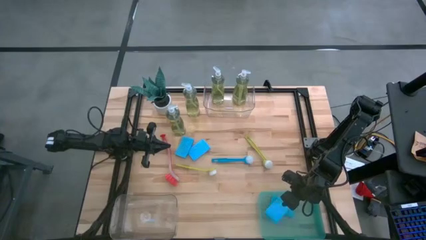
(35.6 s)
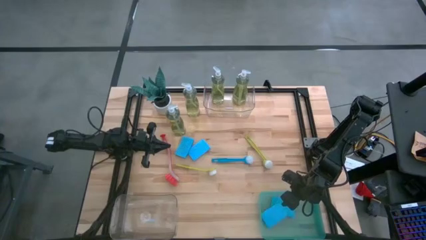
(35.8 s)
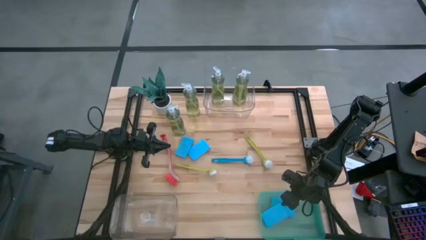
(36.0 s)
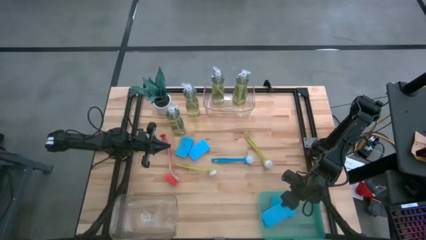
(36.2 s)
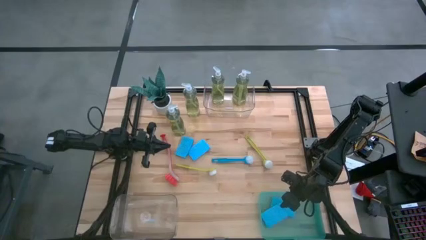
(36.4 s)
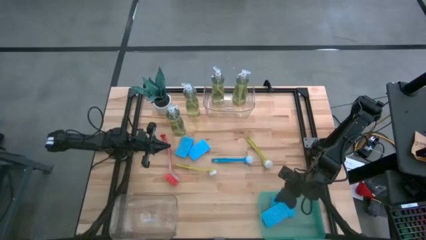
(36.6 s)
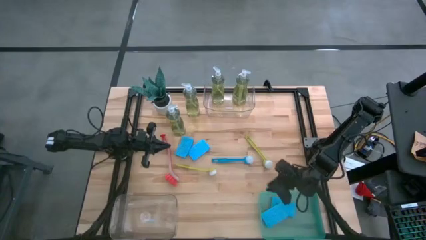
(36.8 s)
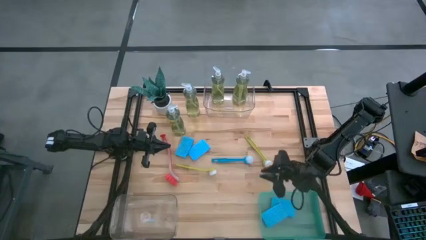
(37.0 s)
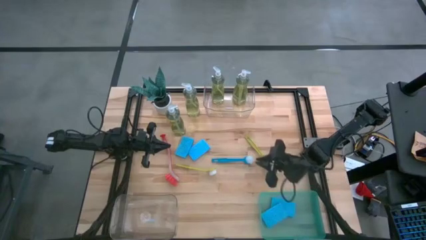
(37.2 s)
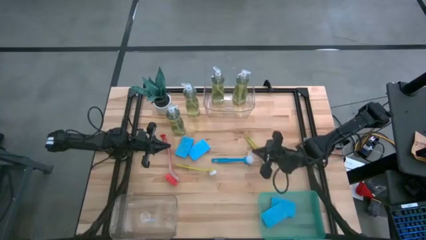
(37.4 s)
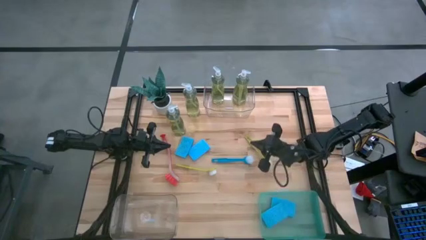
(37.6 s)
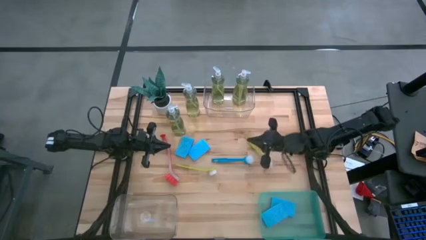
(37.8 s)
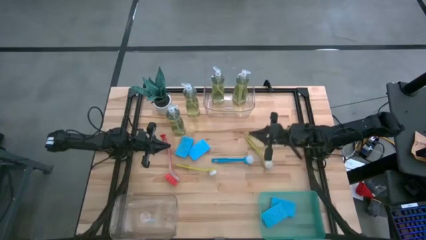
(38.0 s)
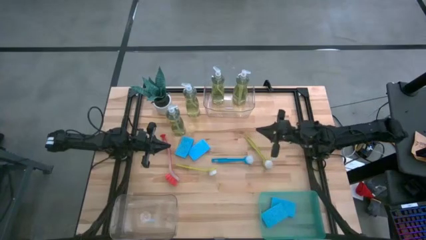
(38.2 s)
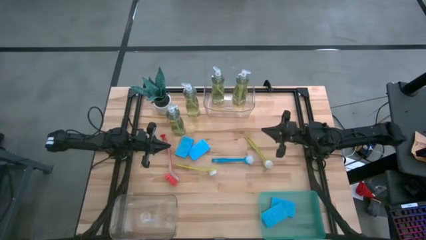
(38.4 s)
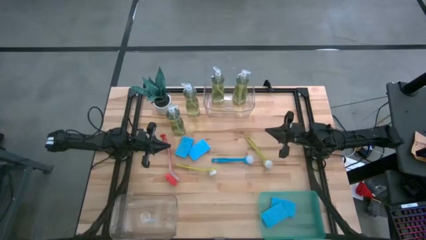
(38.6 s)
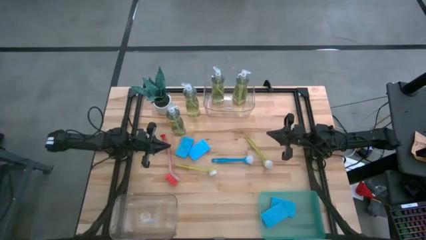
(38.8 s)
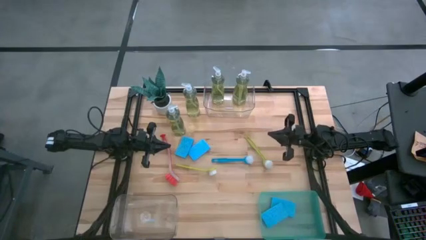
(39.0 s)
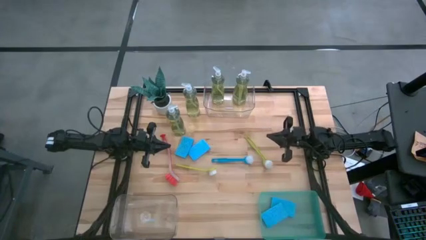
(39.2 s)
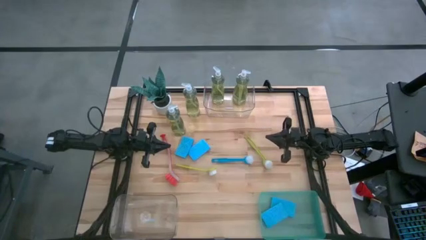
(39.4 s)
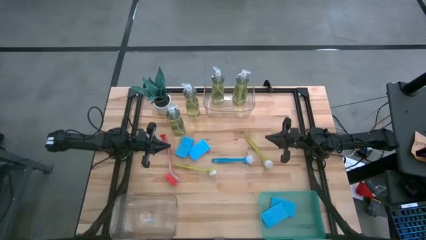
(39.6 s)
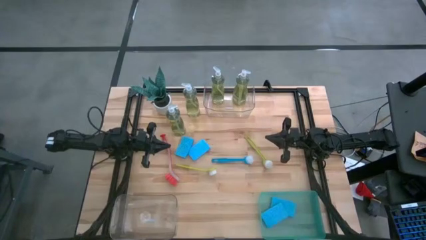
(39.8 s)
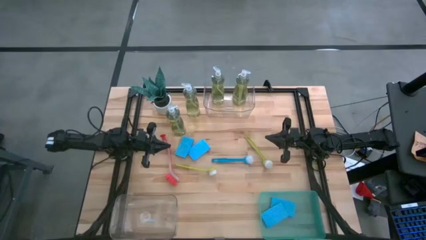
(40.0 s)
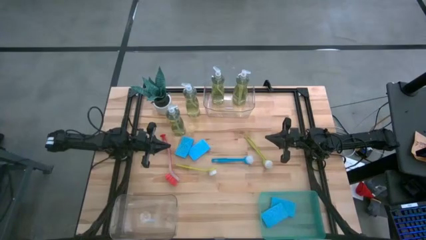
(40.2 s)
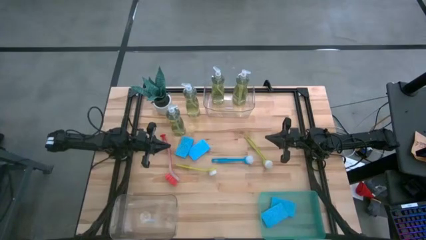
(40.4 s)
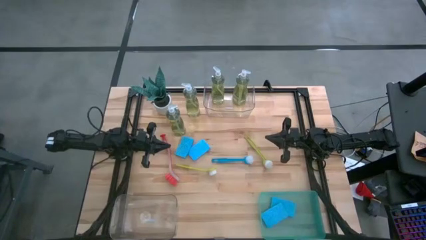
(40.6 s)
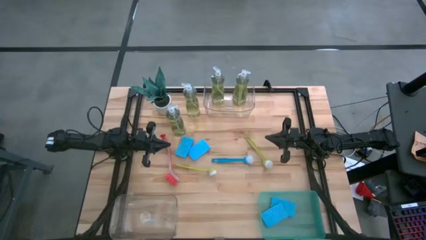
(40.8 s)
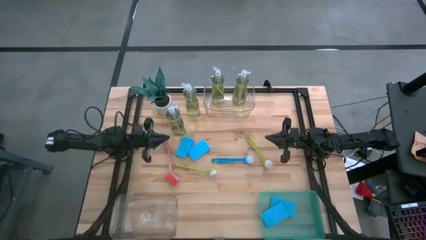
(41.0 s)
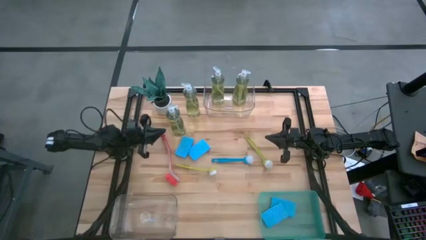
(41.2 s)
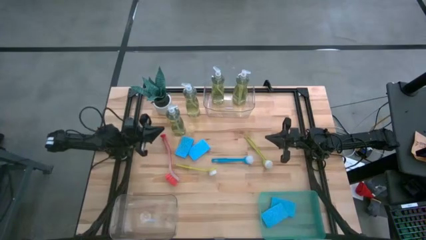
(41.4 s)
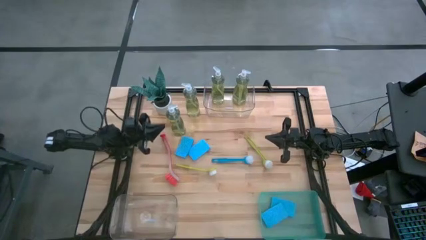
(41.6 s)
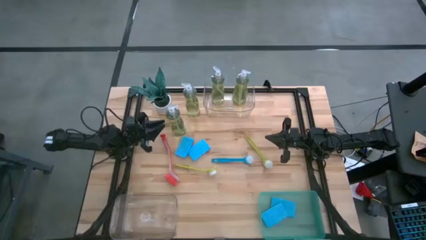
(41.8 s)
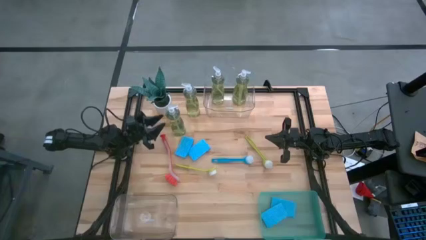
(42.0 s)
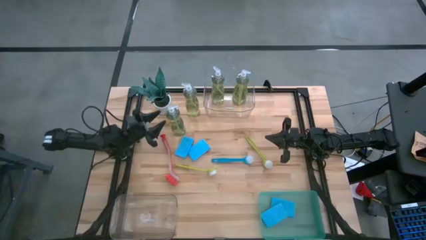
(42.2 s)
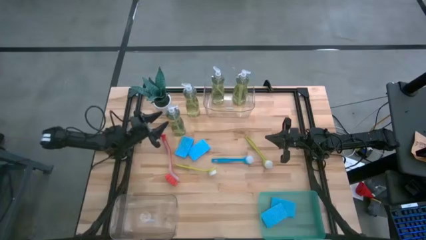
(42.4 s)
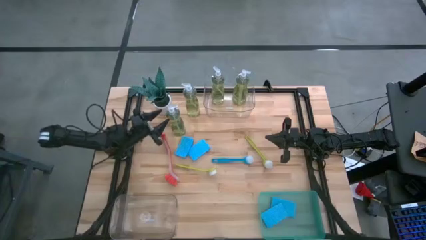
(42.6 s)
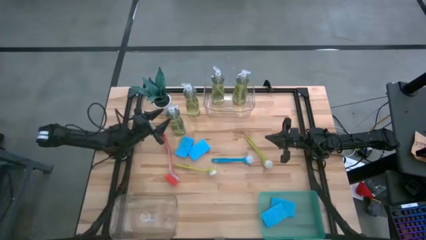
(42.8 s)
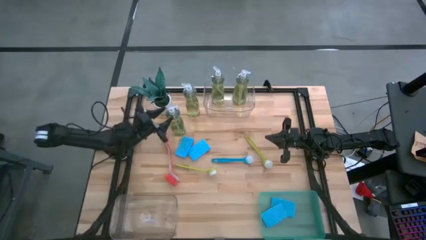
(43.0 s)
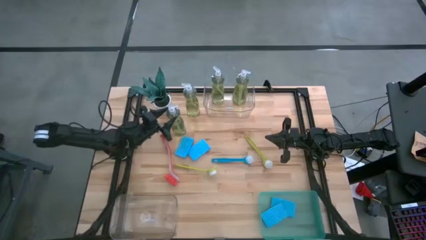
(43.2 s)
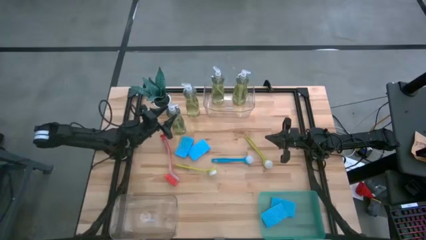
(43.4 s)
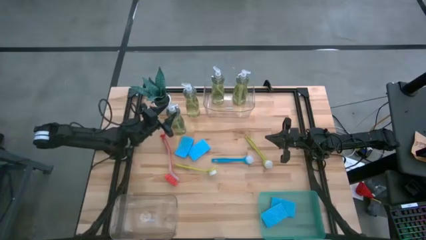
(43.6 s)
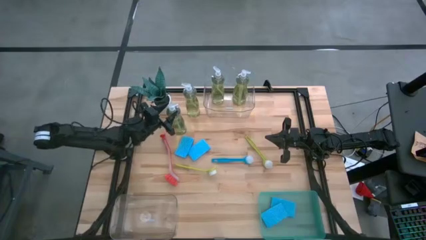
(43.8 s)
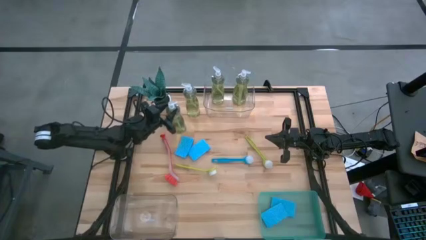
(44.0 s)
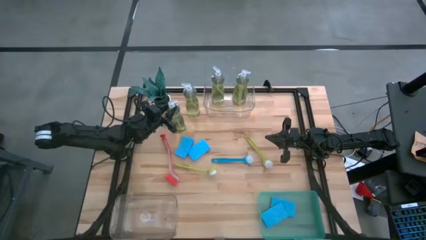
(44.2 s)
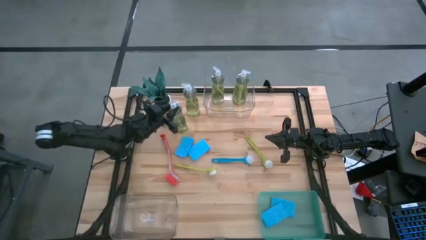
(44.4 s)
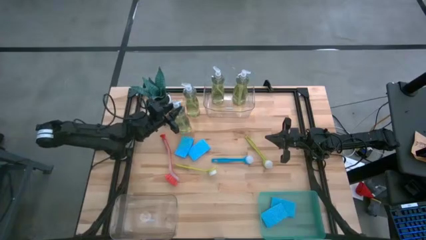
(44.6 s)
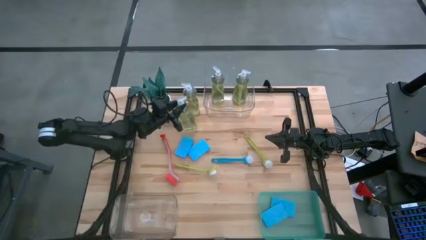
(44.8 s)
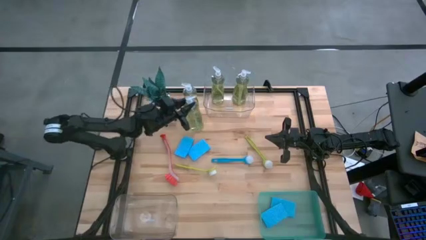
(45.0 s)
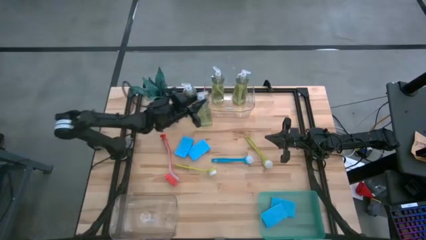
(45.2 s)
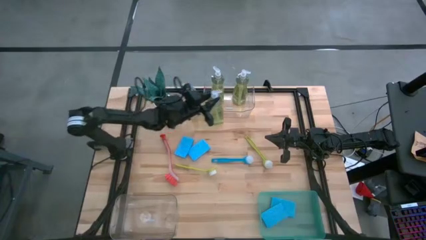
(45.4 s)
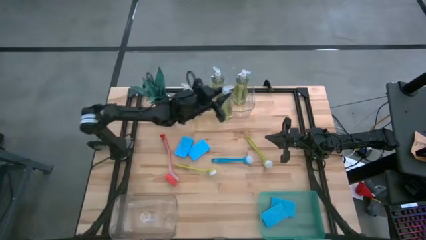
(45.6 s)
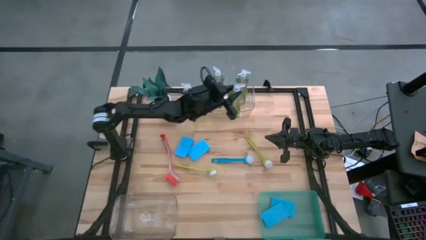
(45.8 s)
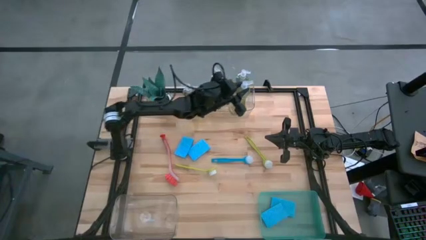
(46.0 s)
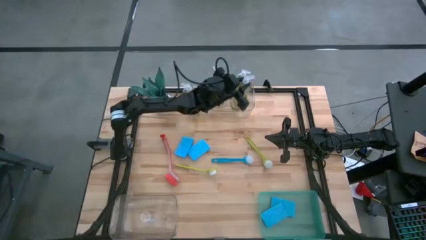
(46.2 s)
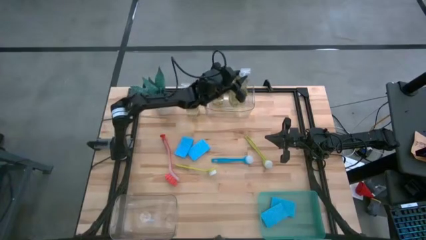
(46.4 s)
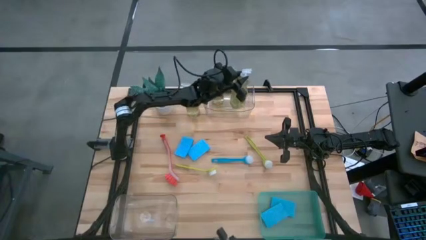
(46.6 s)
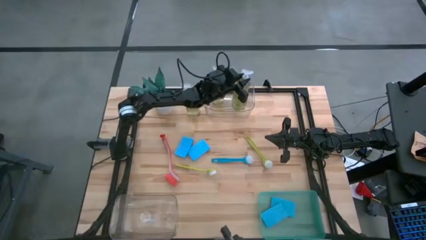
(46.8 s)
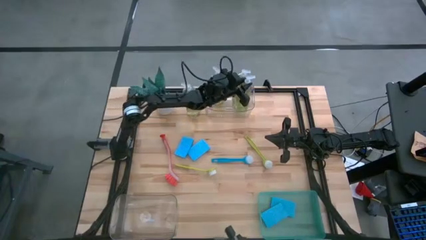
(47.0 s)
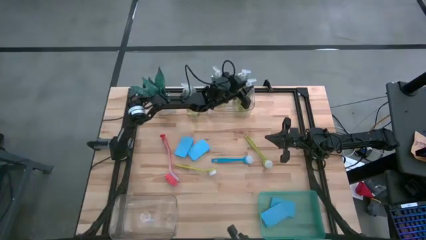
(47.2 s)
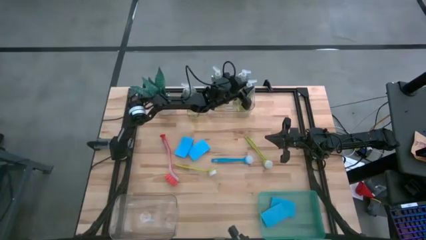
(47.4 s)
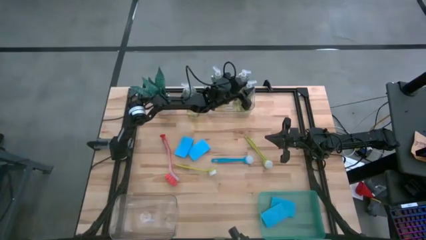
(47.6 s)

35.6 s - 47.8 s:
Task: Pick & Place Kitchen Sink Supplies
Put the liquid detergent into the top transparent bin

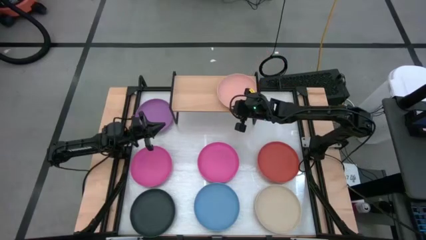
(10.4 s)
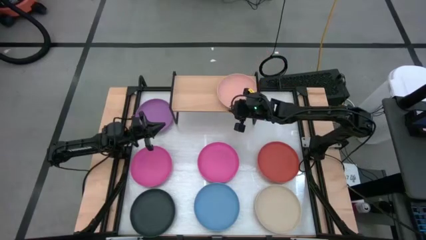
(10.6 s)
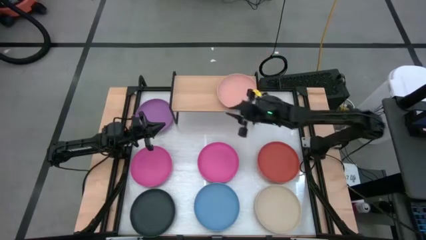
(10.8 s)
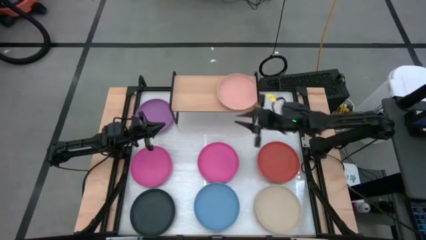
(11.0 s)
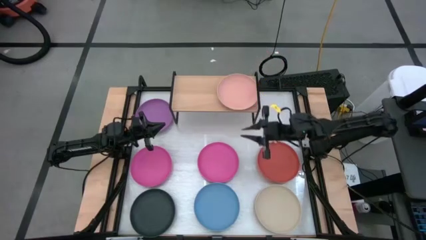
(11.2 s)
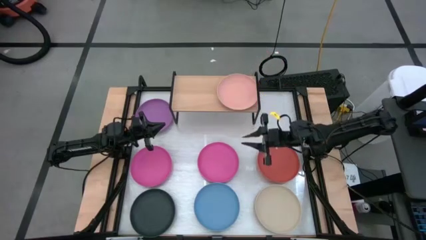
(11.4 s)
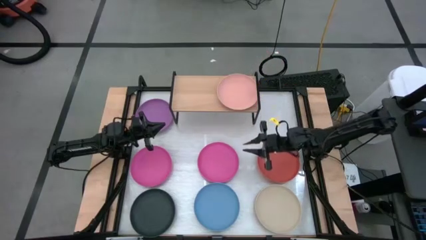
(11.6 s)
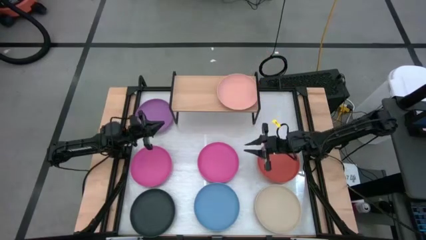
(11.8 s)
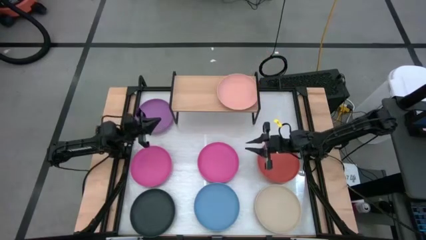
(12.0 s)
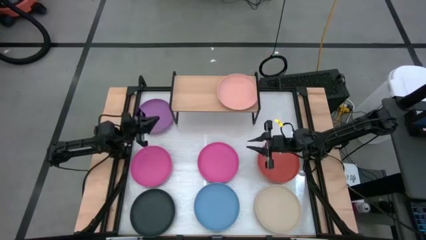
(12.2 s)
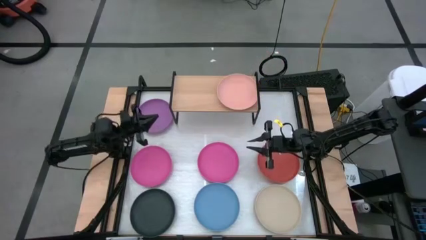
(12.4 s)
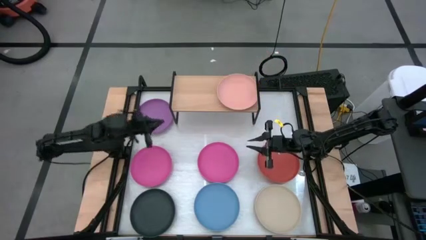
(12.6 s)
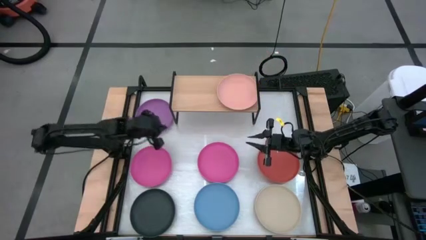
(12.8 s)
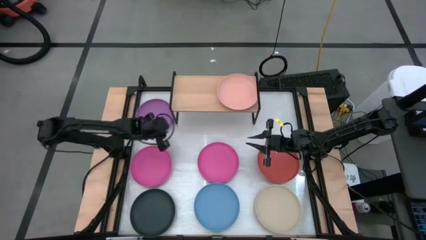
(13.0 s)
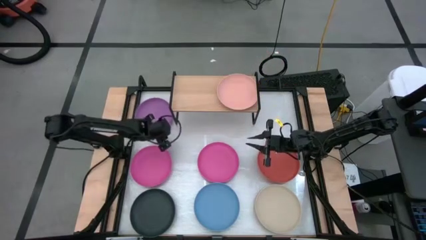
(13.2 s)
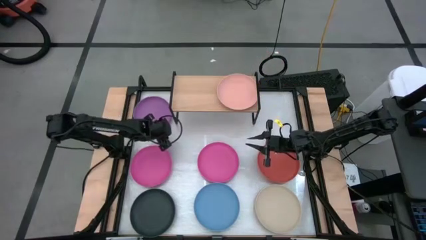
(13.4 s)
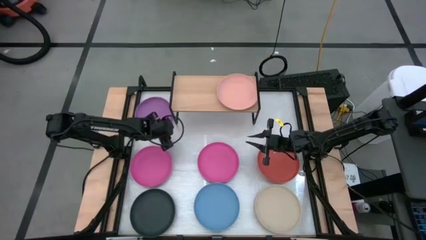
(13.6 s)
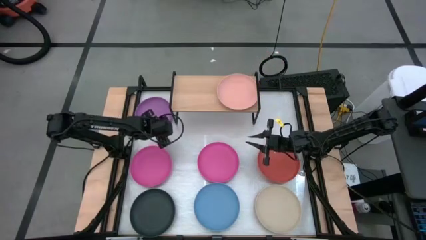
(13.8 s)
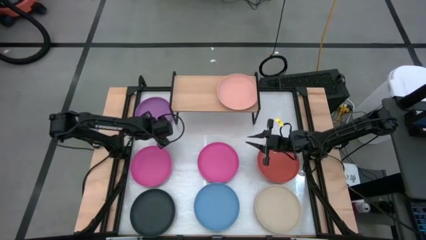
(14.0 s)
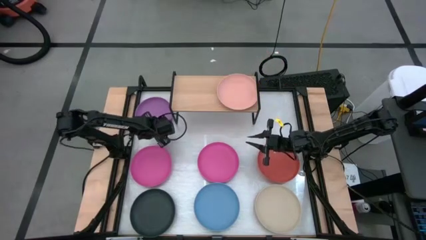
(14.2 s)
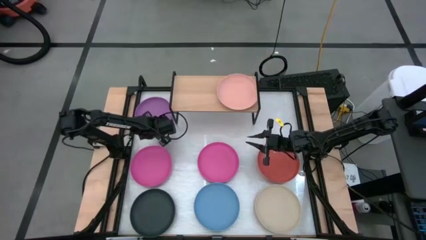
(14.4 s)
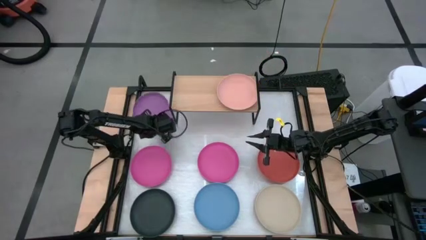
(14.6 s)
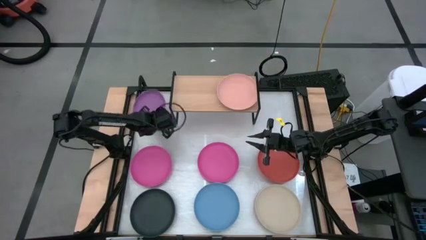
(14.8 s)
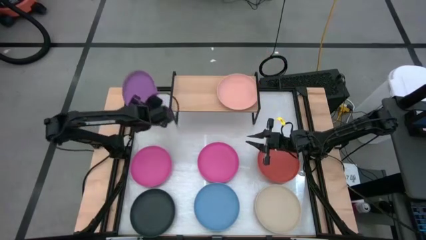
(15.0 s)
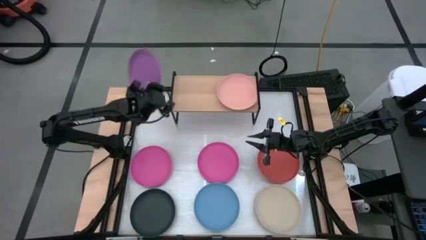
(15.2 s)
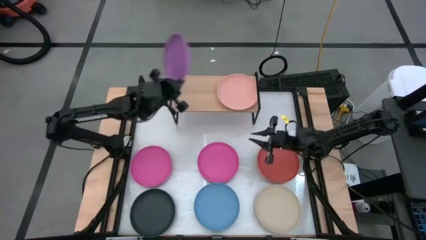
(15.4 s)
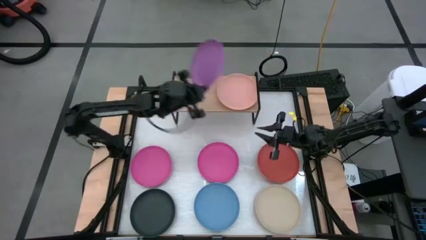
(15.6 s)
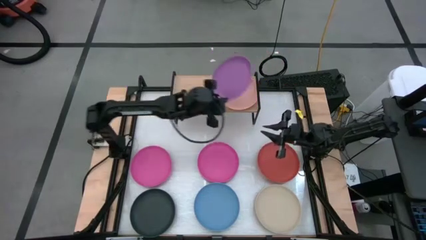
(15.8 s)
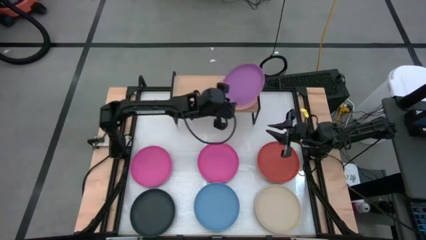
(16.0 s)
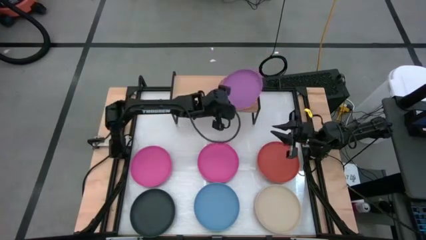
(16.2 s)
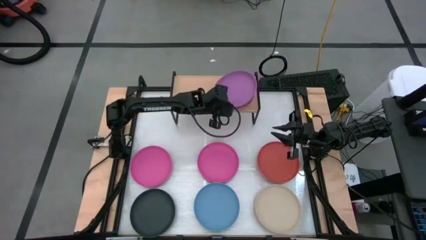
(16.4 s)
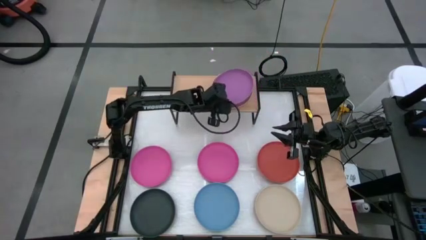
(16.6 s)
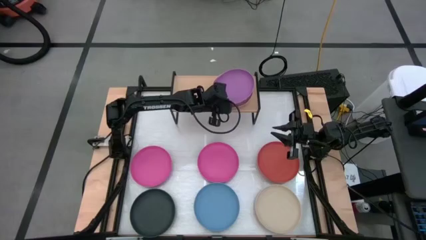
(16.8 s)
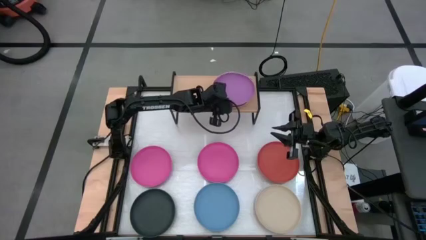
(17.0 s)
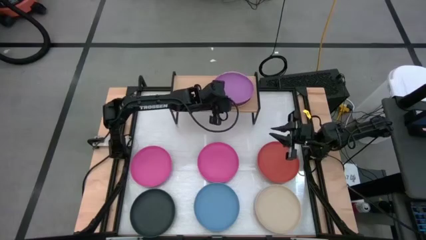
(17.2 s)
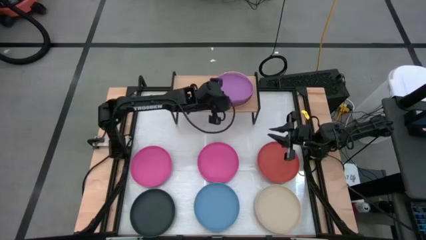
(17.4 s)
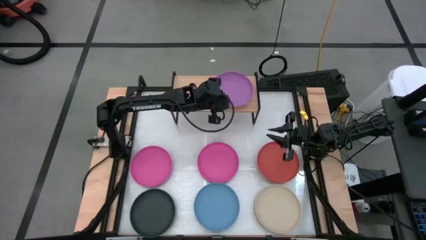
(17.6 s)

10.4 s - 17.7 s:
Task: Place and stack plates onto a shelf
Stack the purple plate on top of the light pink plate
